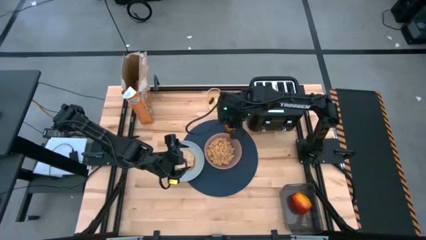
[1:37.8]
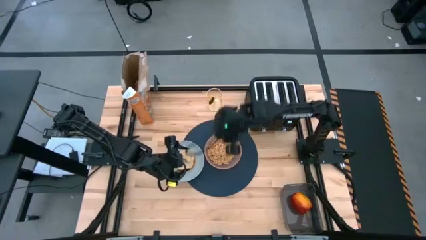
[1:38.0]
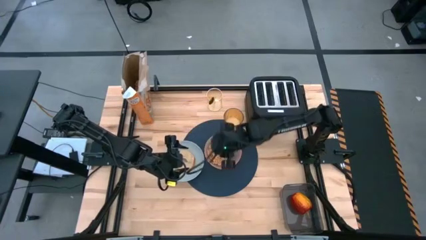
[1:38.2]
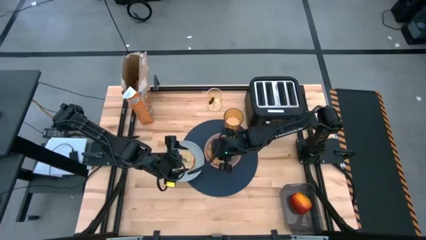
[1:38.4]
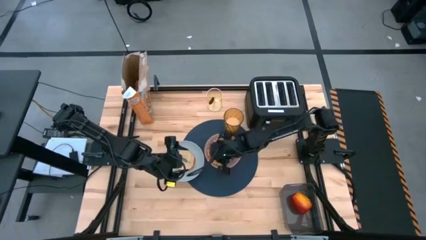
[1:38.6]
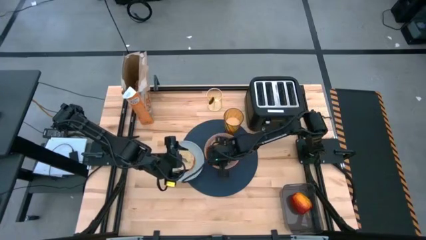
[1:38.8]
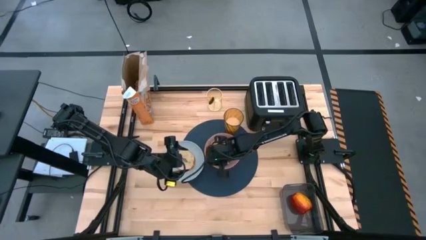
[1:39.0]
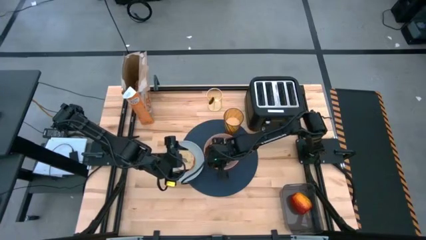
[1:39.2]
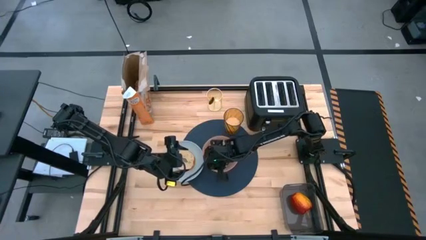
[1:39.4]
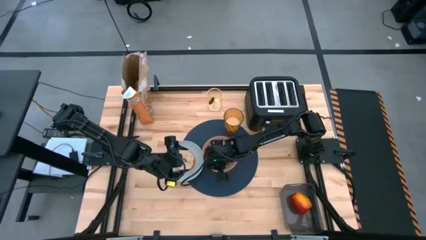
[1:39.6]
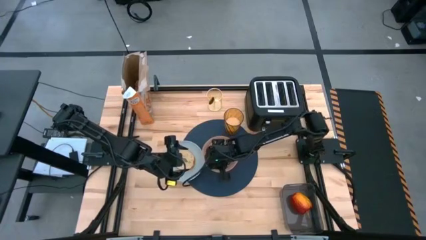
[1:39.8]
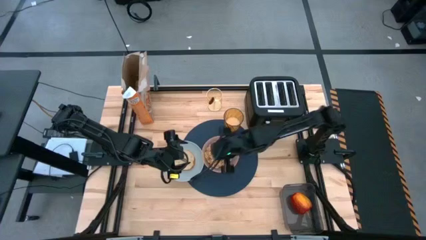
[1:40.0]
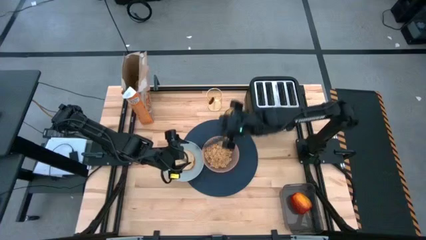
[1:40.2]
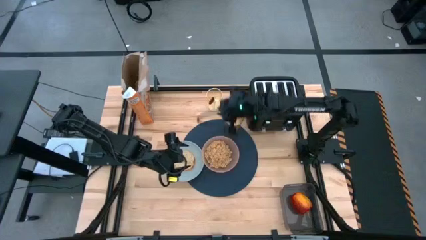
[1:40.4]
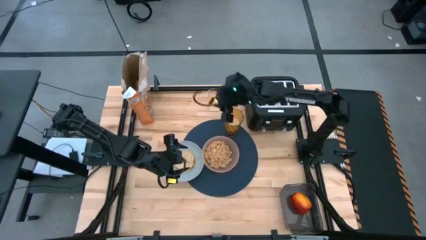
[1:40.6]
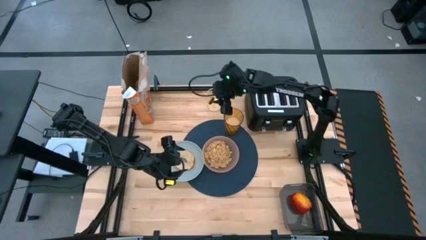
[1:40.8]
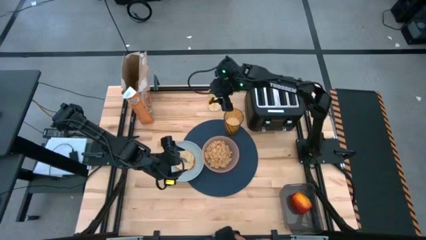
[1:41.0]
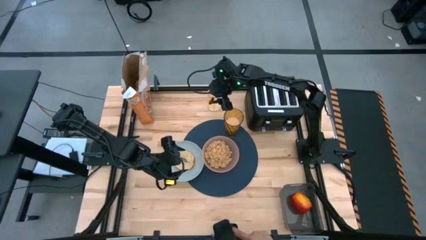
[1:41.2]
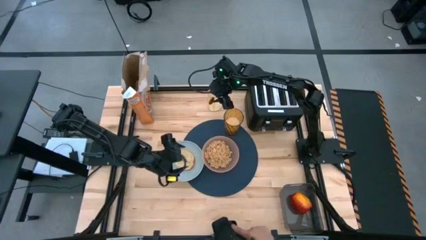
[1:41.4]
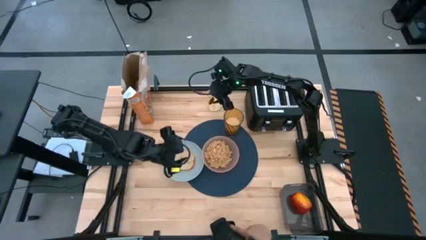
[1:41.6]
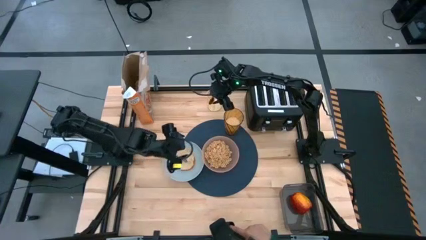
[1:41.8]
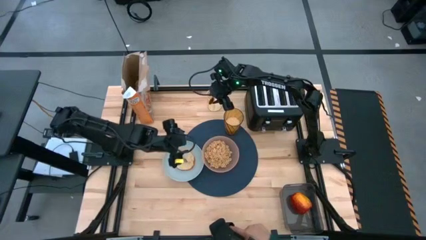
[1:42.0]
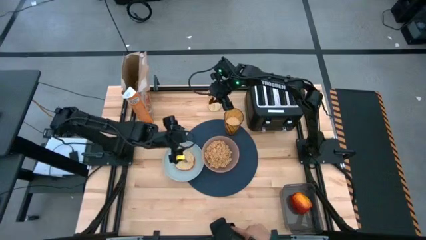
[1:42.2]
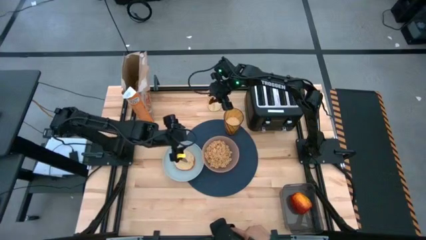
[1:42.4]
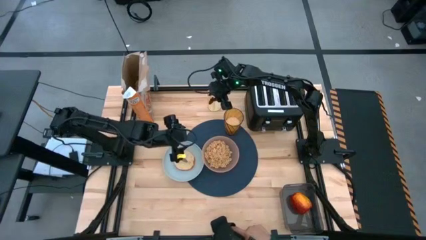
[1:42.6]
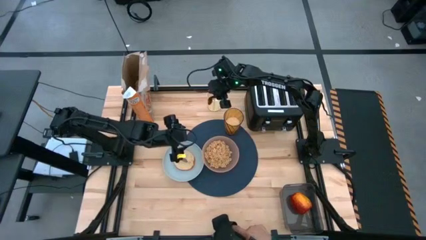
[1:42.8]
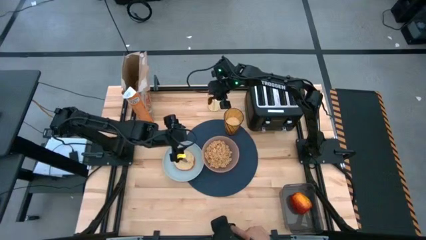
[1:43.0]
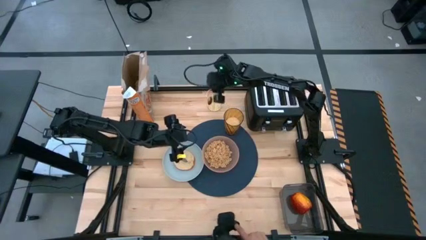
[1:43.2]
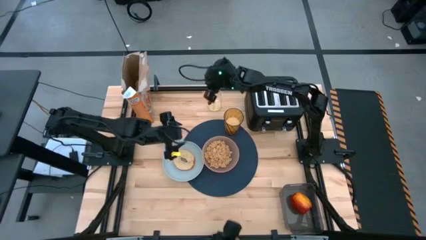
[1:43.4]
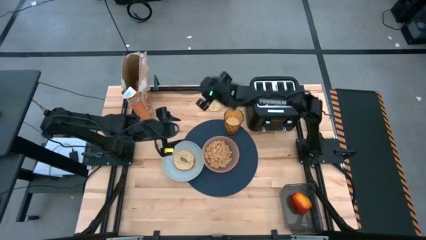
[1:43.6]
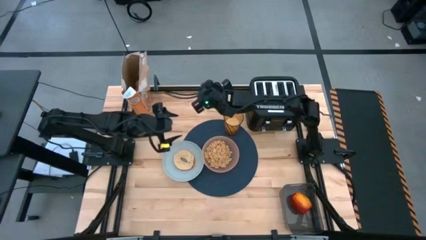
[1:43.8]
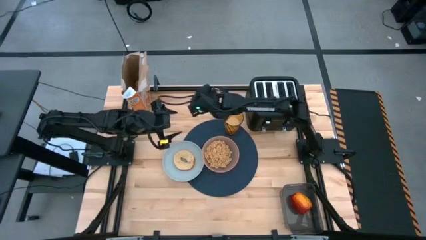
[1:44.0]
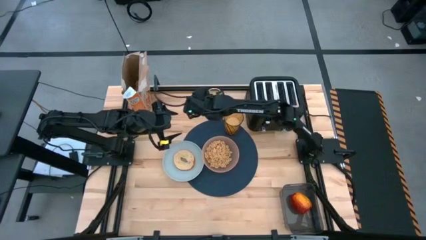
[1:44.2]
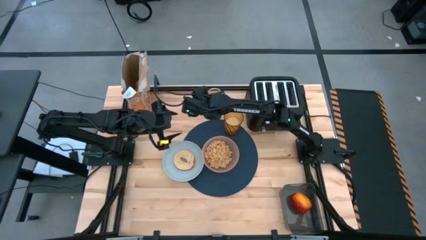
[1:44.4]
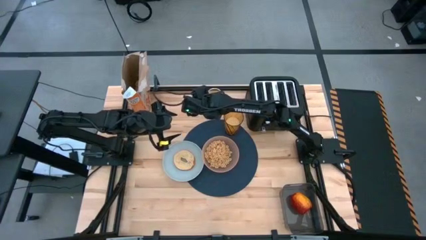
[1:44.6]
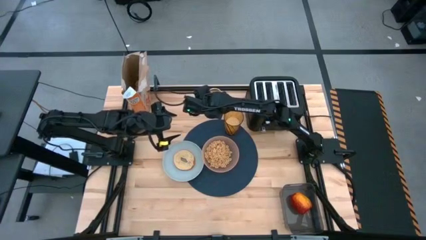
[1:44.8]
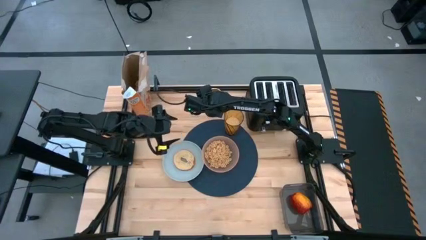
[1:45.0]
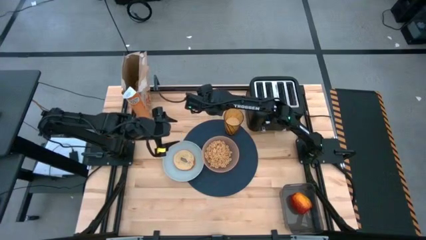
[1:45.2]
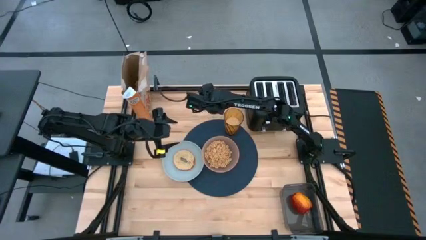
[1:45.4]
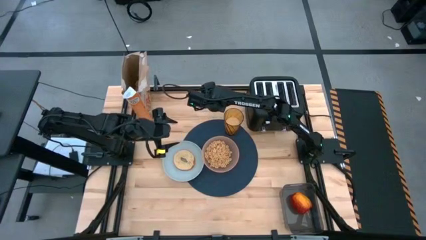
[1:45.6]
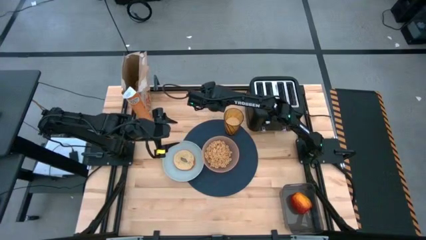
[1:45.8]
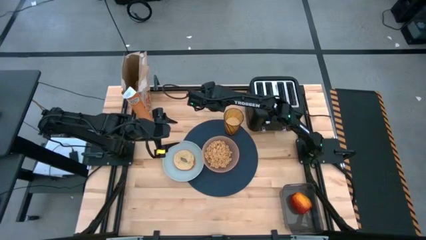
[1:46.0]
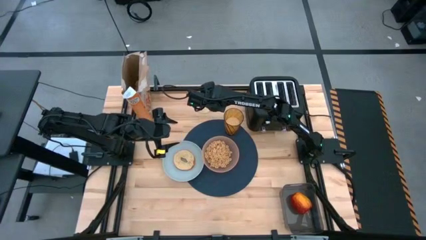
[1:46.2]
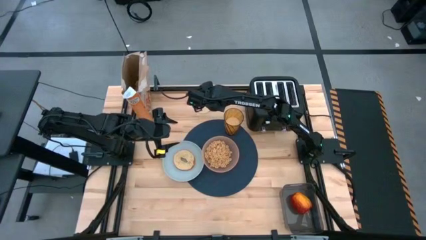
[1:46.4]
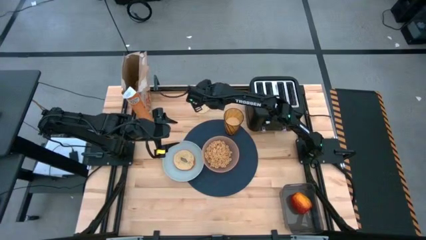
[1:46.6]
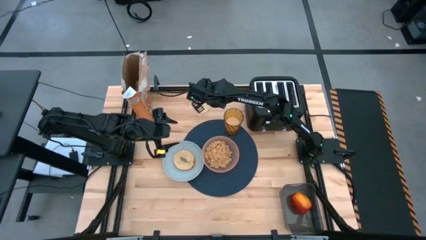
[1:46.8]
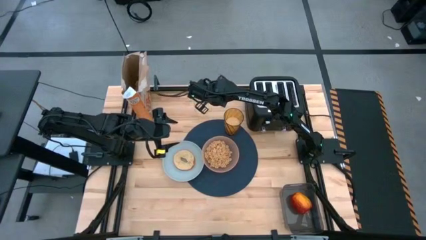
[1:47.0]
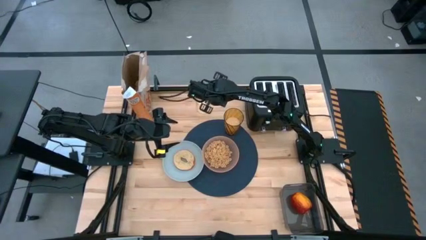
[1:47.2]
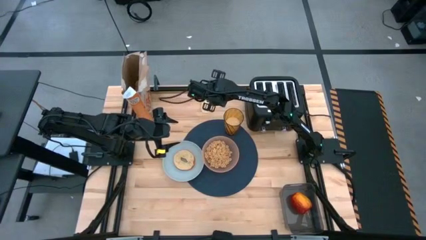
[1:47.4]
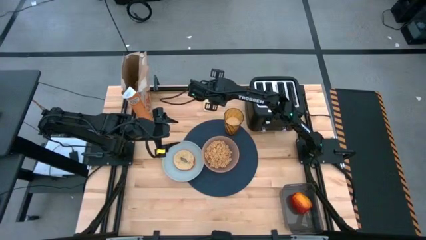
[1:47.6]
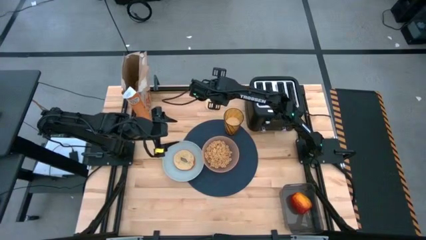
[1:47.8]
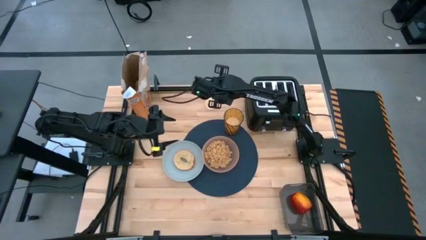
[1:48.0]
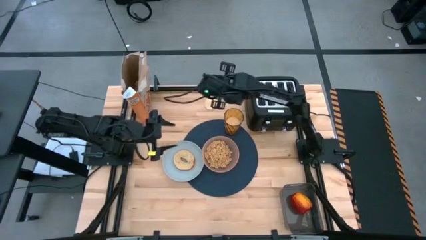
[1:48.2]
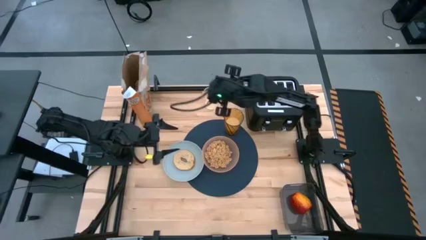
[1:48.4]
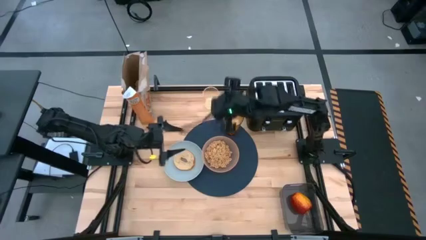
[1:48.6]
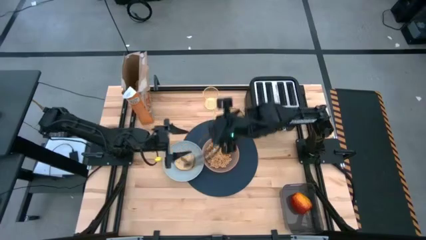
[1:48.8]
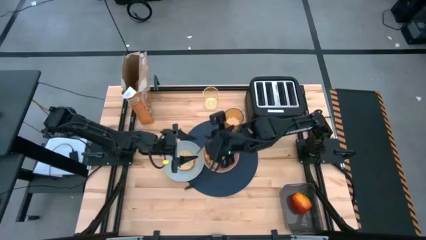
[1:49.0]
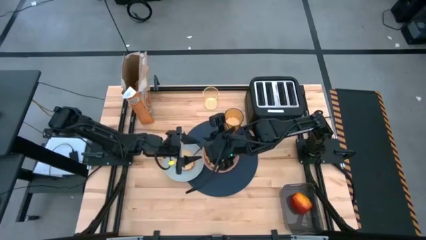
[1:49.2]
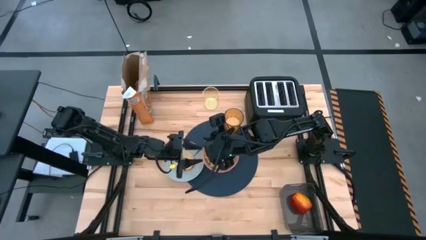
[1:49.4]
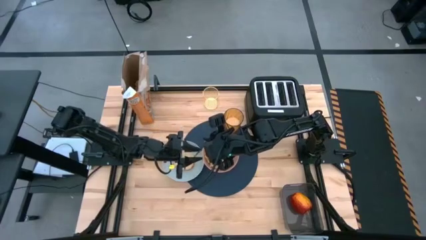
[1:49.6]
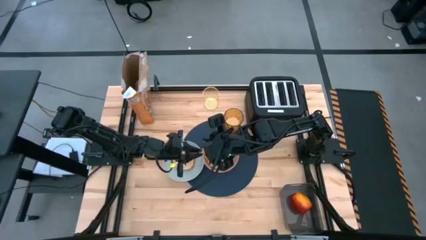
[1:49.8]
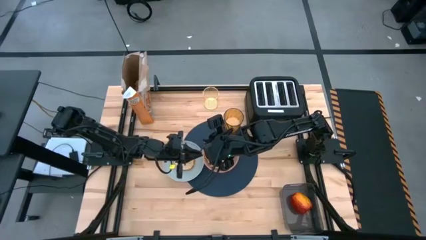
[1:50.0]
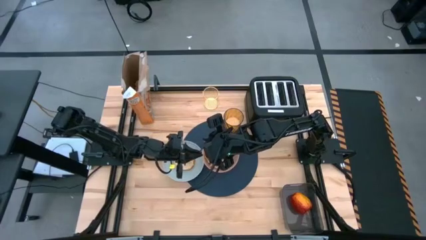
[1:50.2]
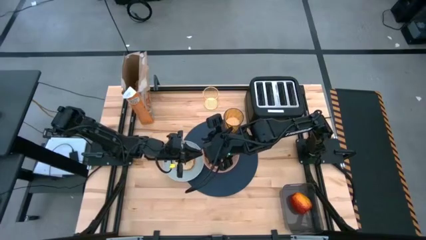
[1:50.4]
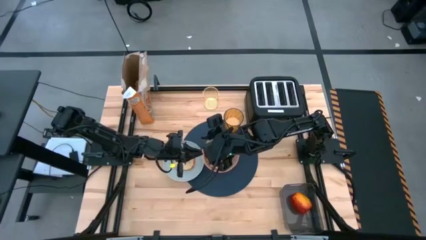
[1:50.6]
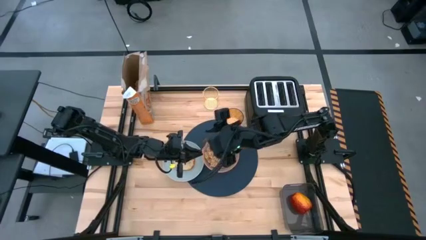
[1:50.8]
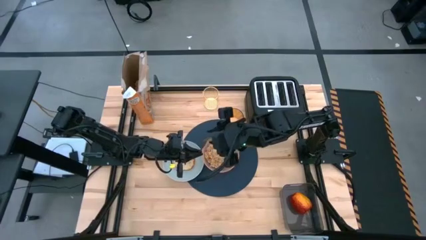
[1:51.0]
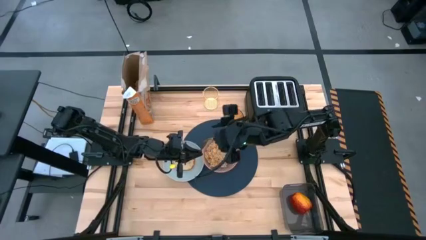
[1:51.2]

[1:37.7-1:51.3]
Task: Arrange a breakfast setting
Put the gold spoon on the right of the orange bowl
